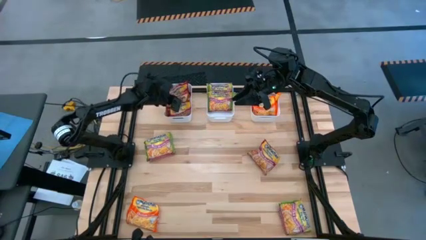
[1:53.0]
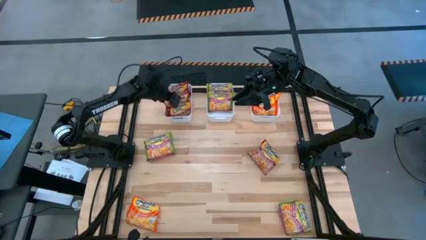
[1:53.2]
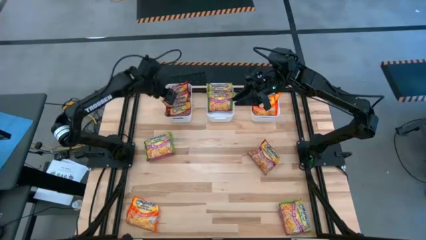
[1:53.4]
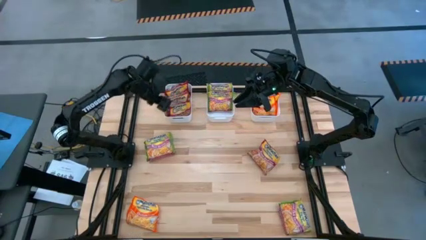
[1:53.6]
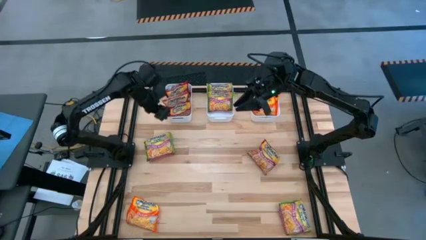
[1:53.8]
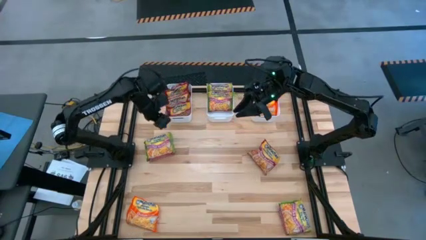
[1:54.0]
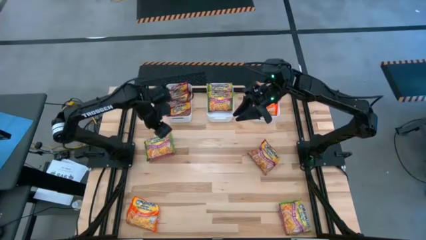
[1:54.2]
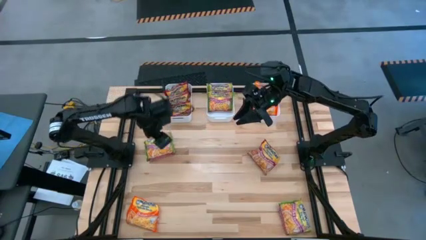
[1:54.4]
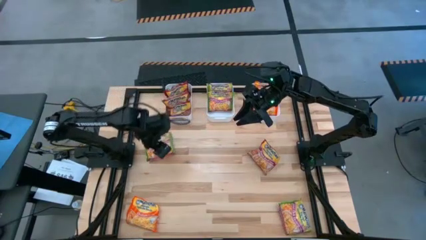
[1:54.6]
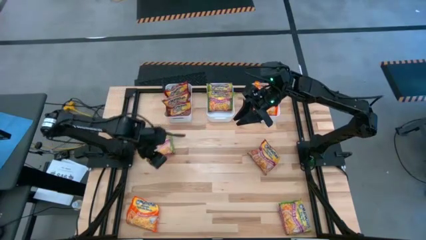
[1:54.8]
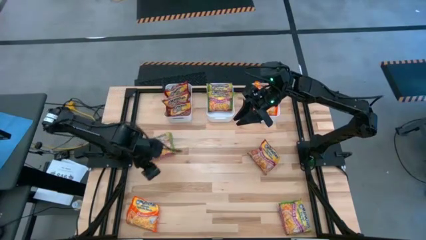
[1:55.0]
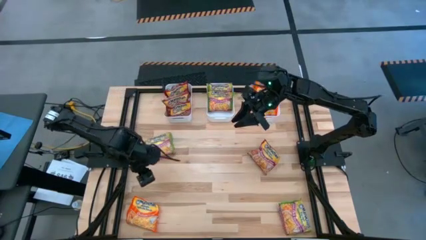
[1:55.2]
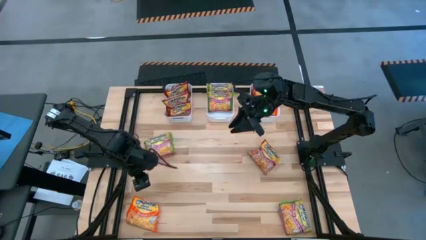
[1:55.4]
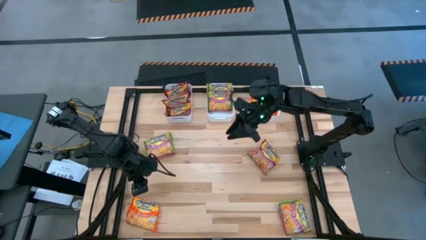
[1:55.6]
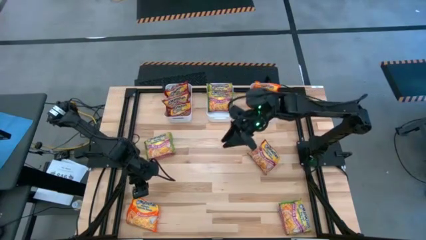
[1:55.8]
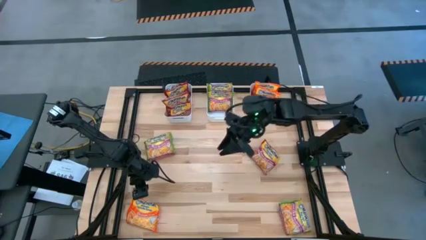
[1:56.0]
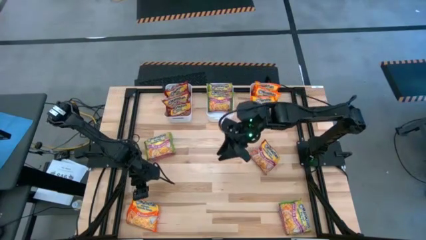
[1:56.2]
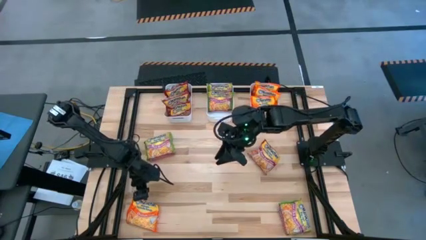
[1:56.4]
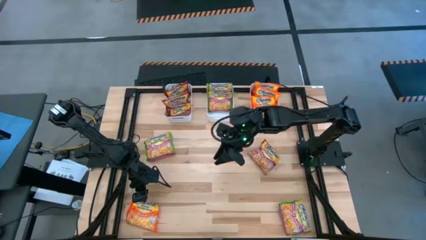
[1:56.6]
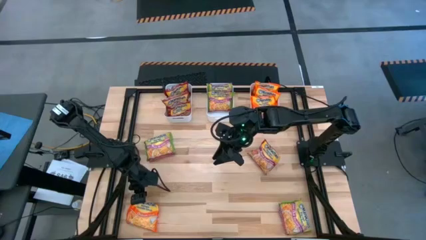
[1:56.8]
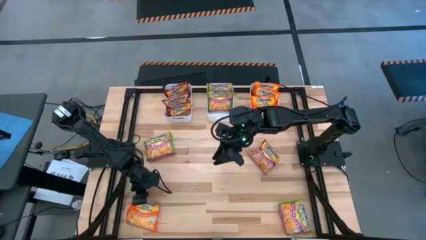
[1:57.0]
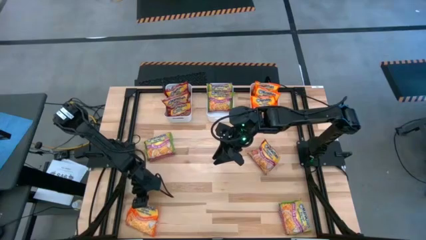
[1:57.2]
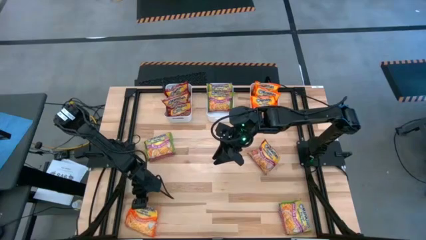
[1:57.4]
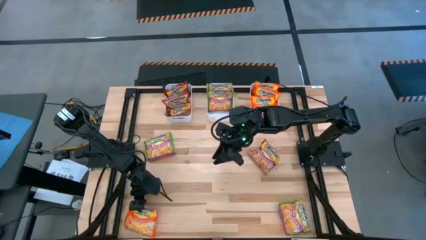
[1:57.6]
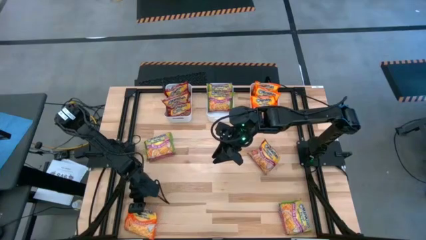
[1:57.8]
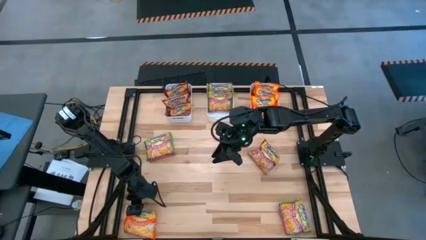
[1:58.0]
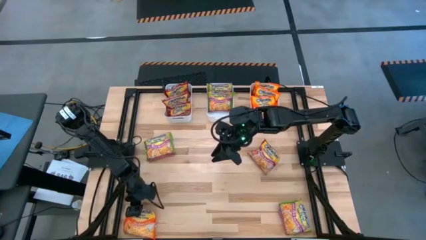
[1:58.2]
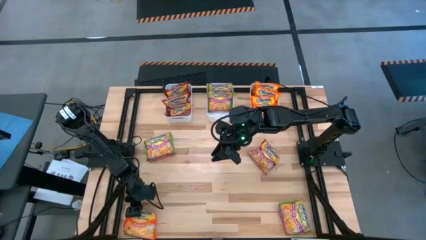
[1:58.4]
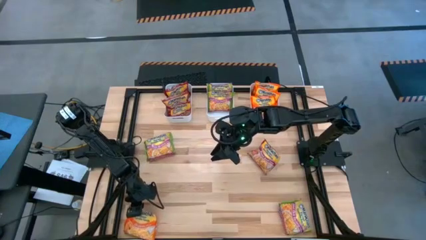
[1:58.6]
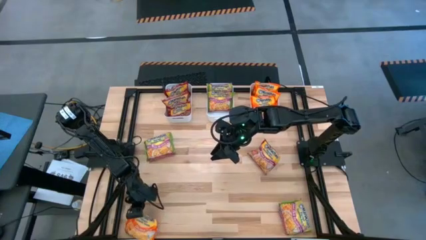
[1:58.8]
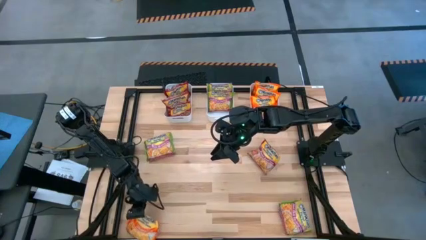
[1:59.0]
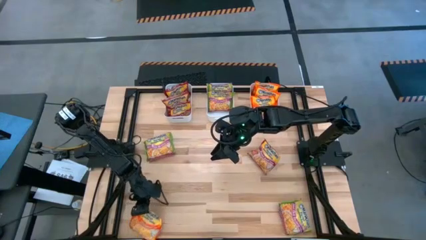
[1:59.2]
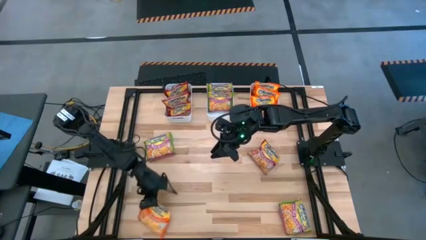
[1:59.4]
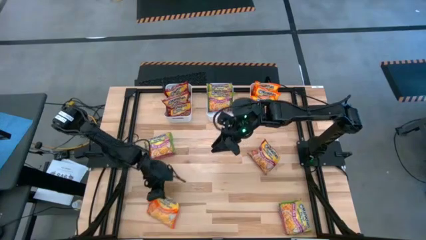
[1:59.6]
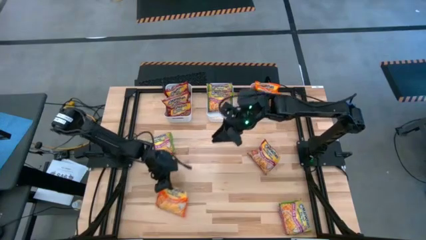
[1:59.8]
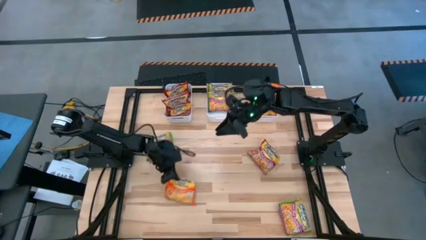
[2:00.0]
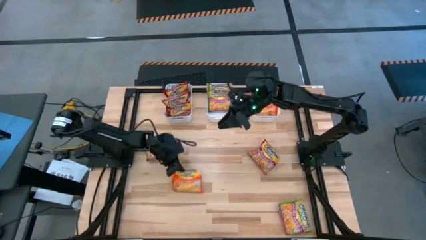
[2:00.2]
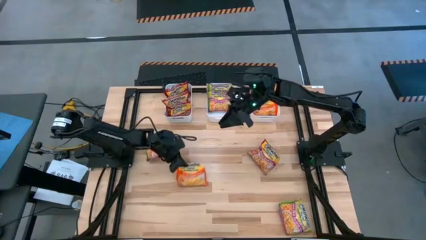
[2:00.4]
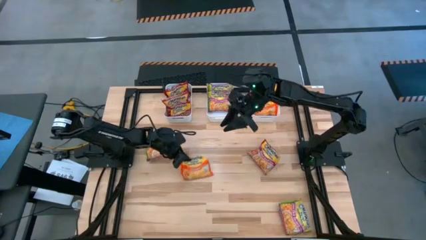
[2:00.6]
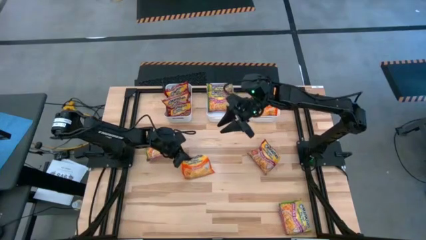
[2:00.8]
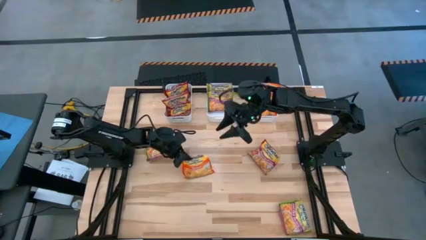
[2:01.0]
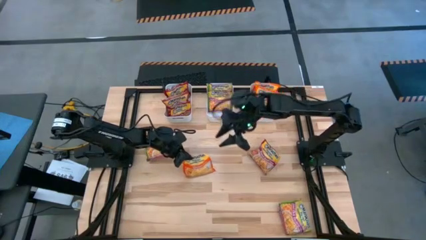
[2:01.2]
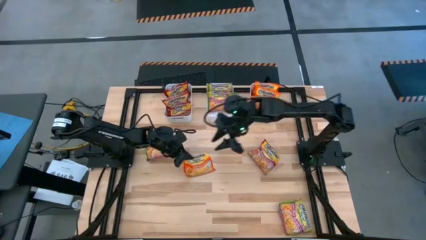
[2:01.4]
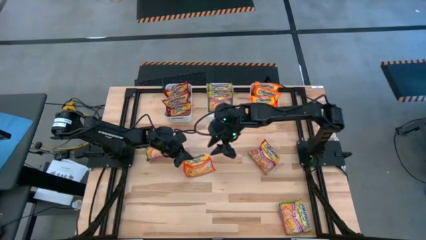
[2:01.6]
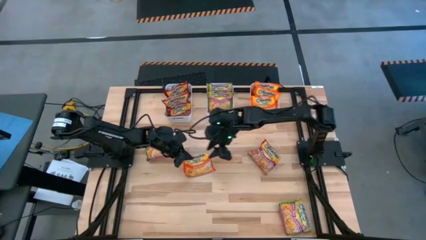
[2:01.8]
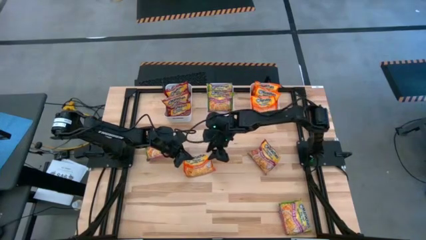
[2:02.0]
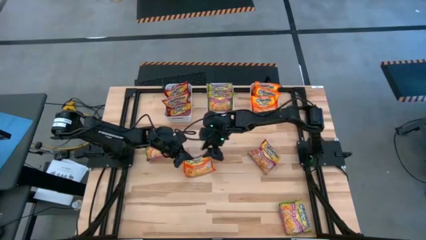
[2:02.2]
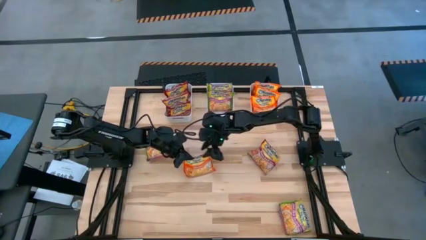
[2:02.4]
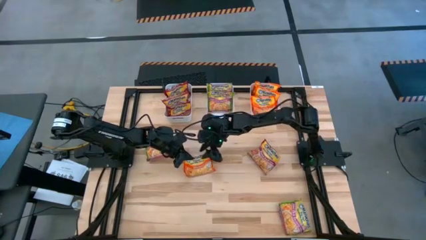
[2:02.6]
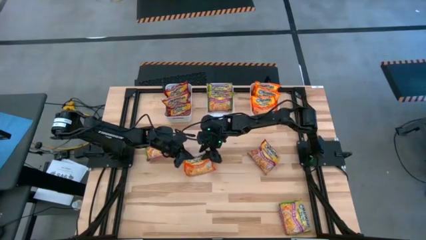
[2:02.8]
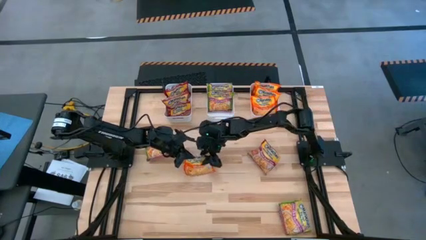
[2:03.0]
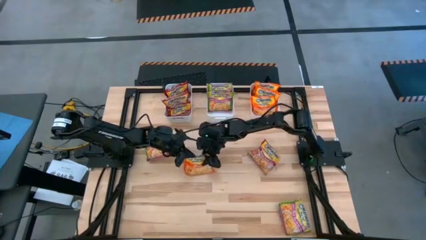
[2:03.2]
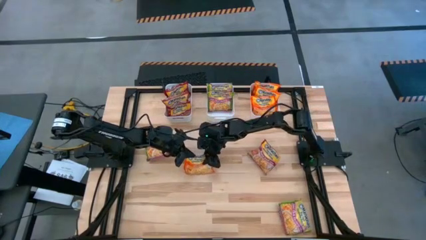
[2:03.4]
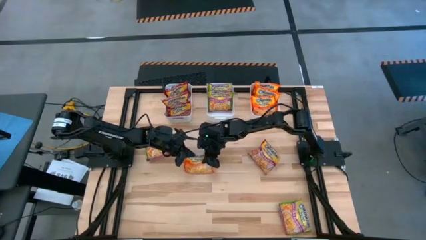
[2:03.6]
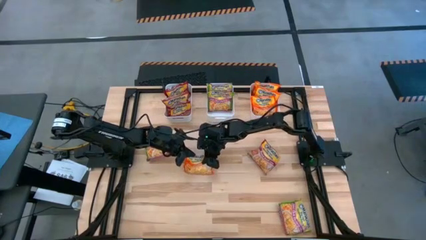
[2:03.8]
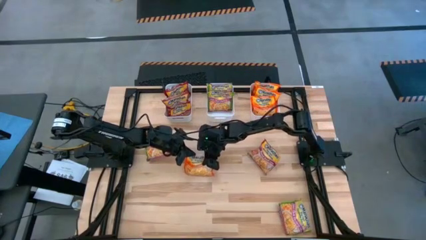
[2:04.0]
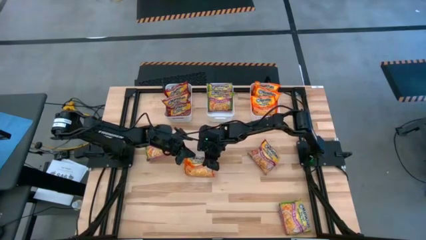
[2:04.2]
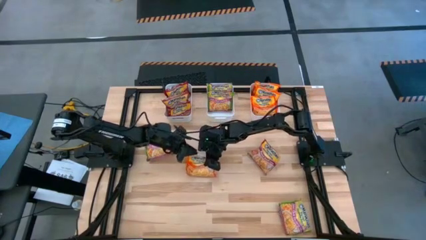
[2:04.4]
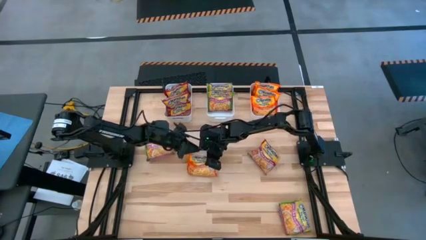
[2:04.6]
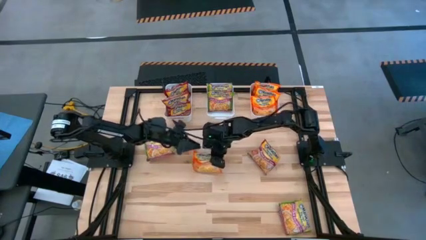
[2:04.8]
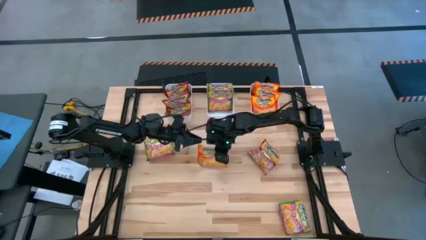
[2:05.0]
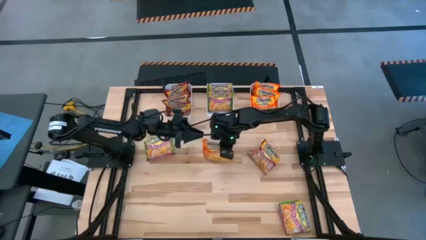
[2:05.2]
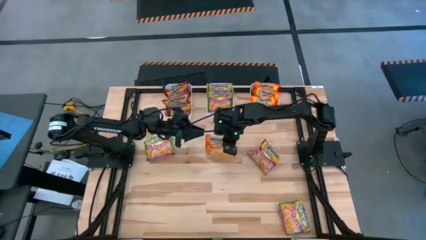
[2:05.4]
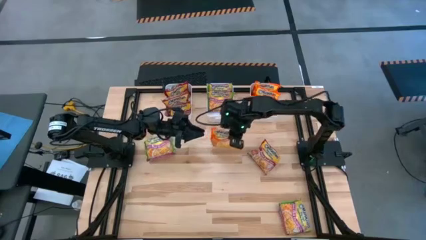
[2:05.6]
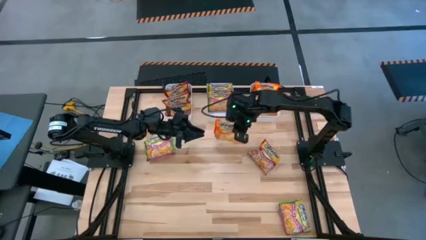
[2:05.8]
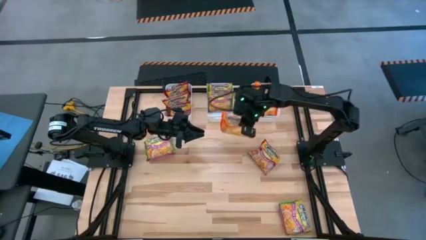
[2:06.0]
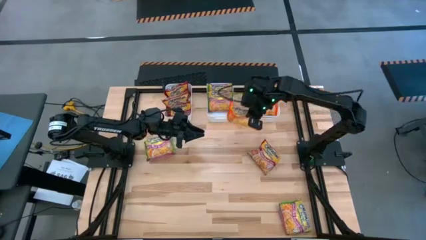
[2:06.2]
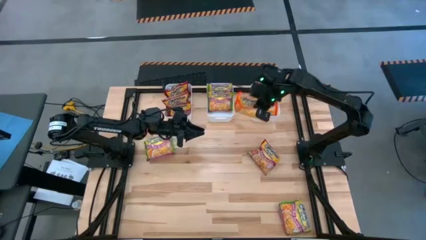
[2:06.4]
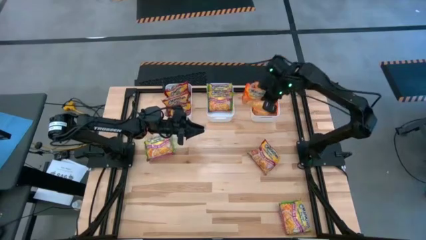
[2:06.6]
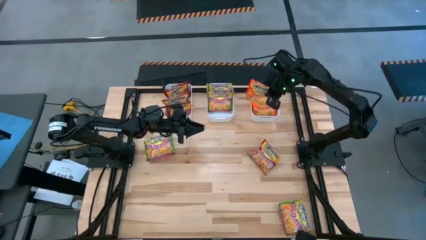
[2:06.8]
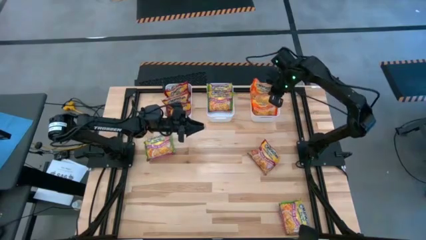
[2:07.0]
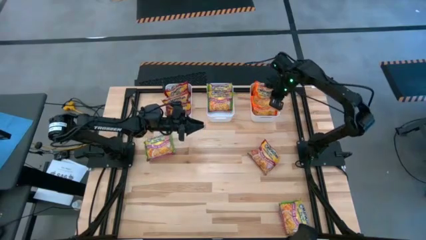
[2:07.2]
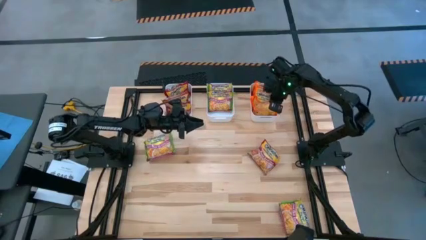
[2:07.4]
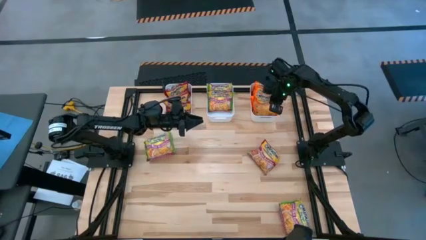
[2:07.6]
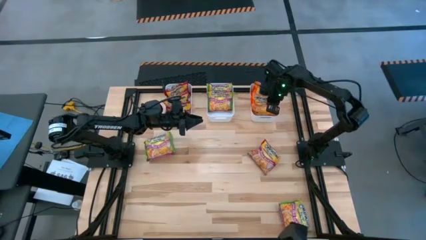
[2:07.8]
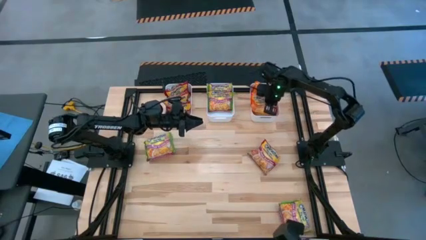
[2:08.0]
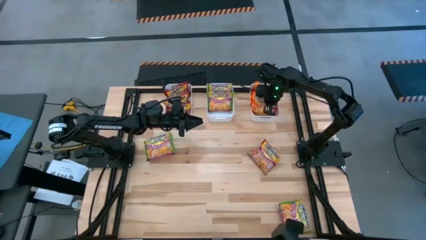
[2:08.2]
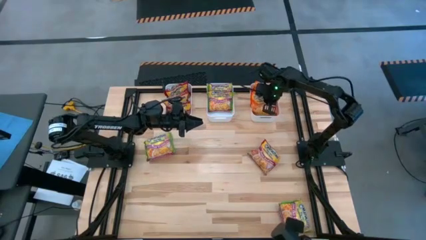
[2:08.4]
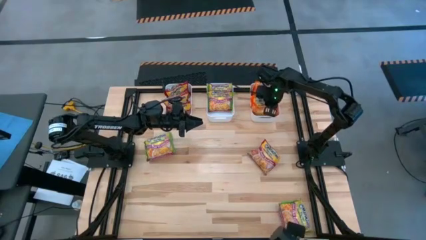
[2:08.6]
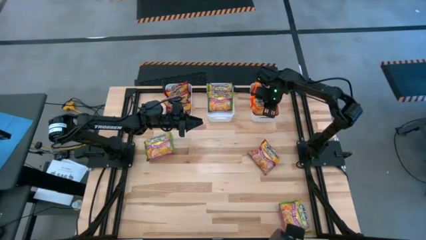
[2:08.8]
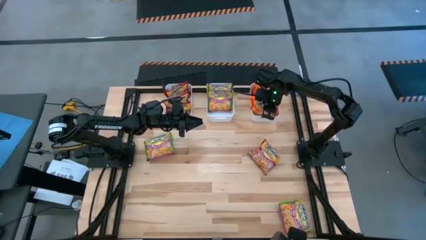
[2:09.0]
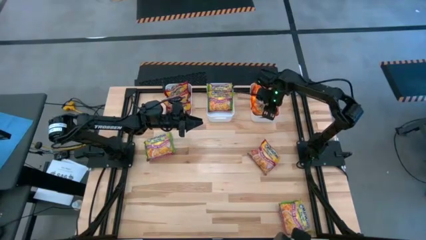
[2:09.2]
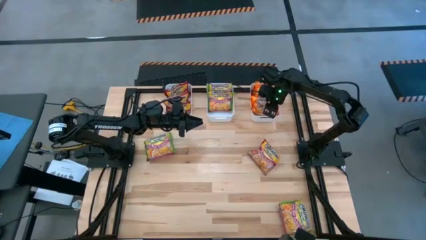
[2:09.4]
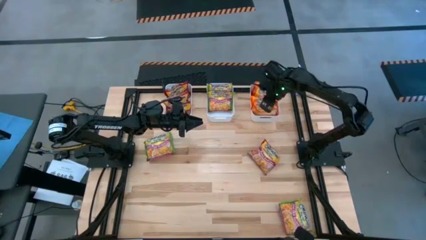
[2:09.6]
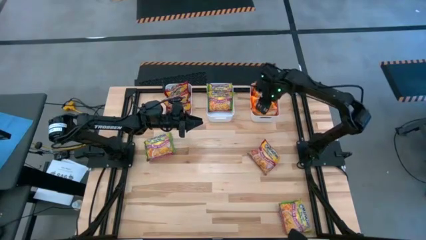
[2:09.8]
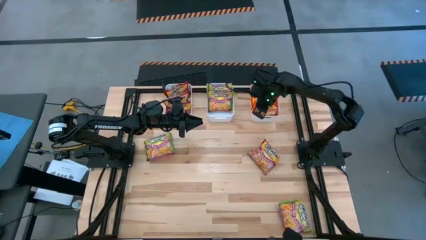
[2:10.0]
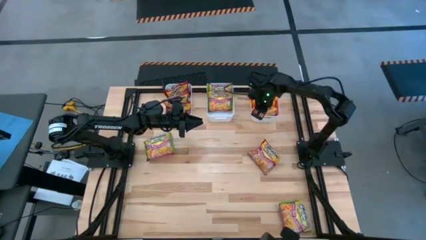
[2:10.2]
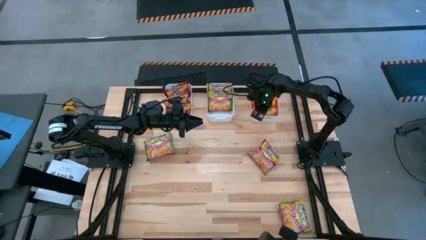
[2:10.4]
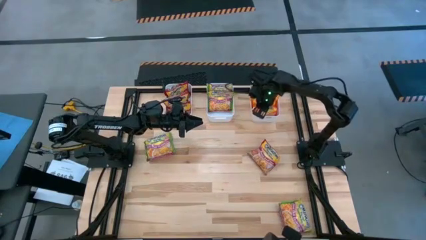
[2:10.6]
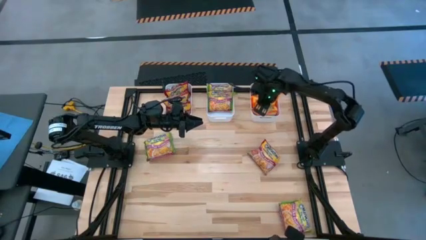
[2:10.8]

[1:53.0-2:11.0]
Task: Sort Maruchan noodles
Put the orange noodle pack into the right white bin
